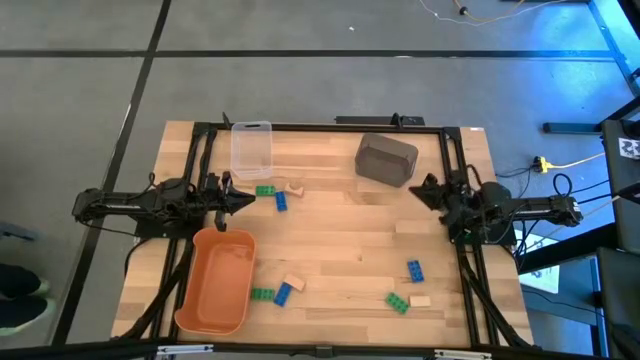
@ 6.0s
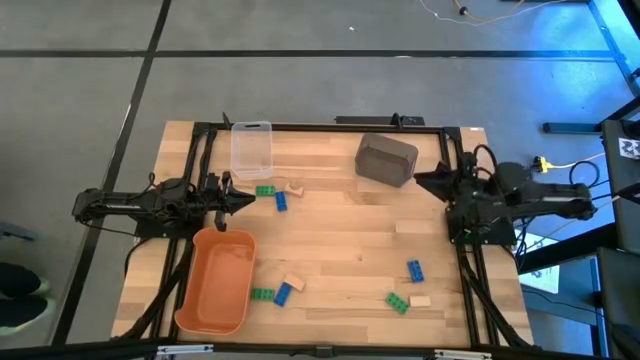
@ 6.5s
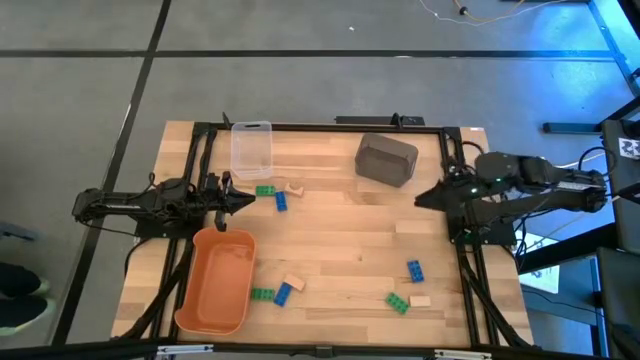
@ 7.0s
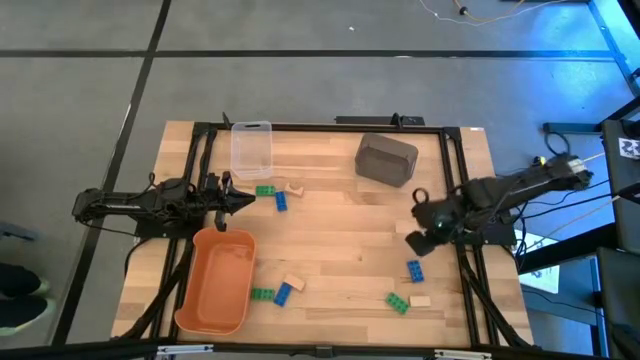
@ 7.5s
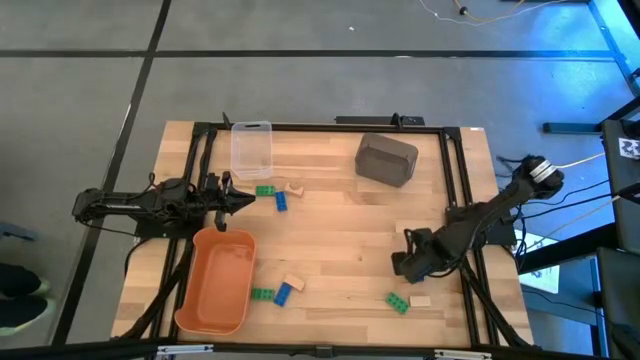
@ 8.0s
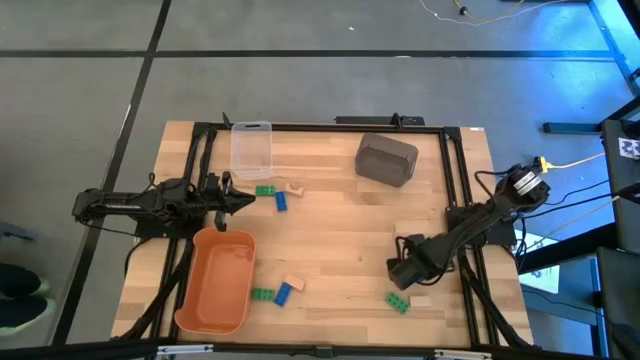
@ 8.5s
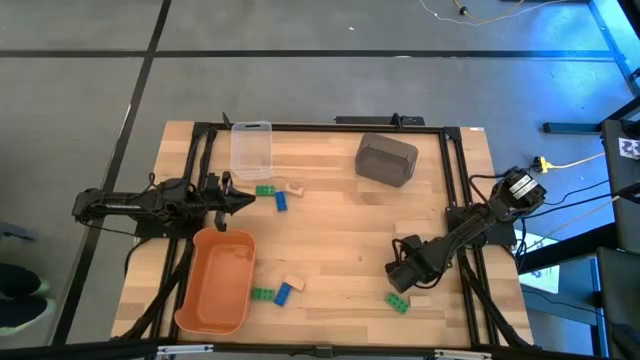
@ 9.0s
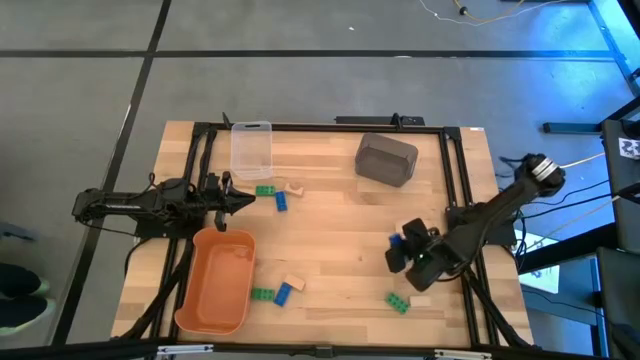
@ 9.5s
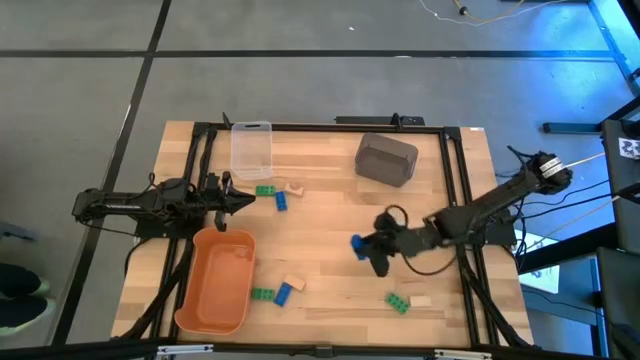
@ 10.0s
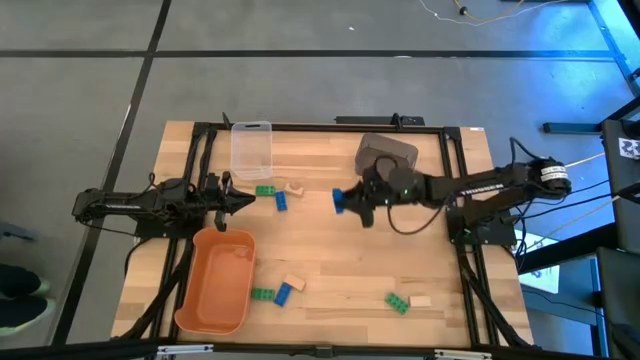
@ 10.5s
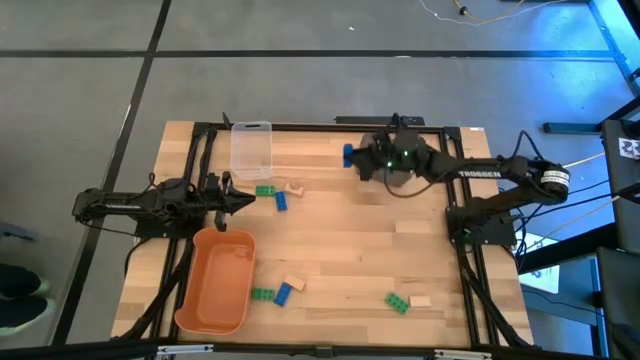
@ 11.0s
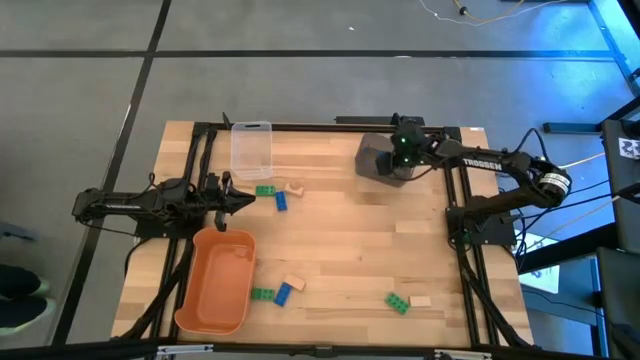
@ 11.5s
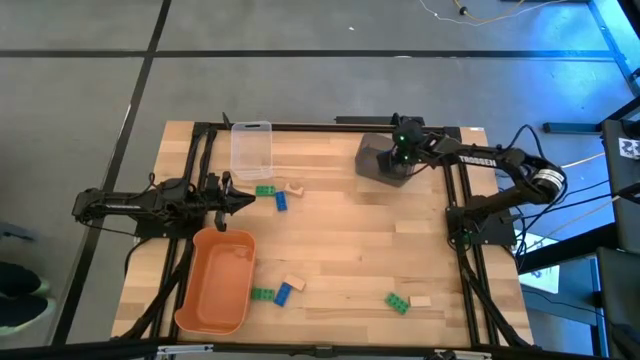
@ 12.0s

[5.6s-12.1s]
Task: Sort & place blocks by color
Put the right blue game piece into the black bin

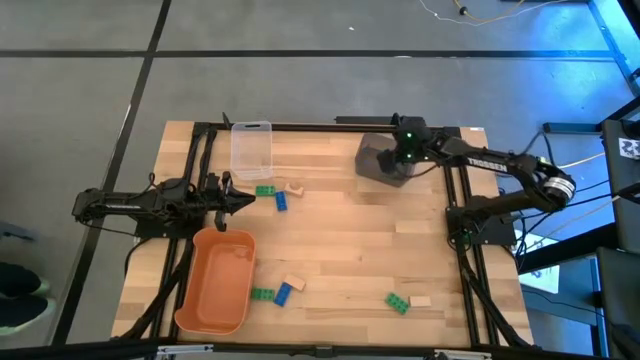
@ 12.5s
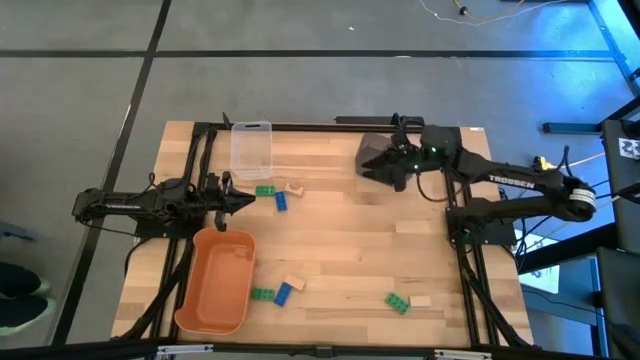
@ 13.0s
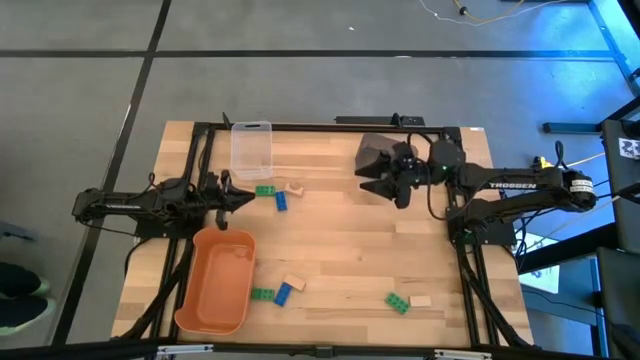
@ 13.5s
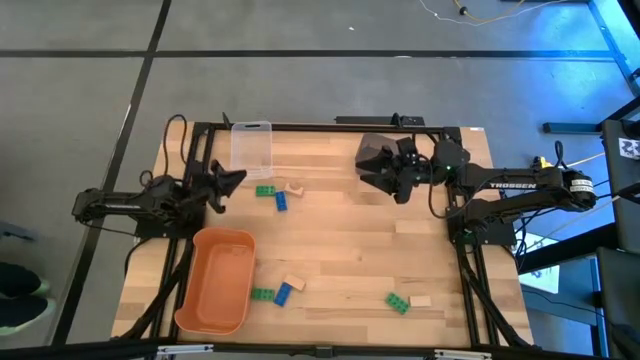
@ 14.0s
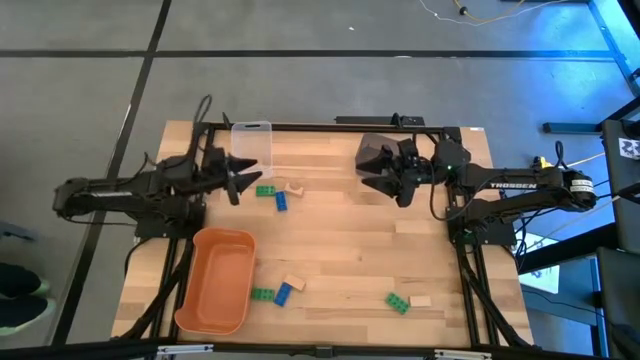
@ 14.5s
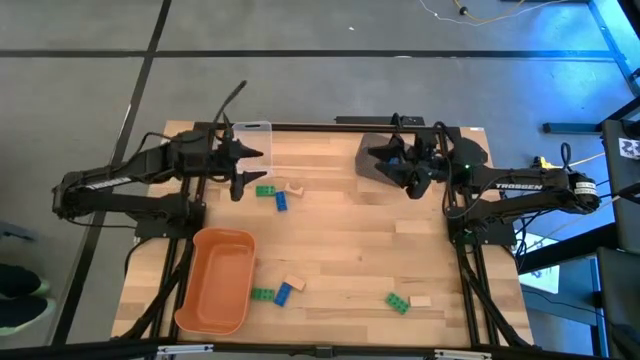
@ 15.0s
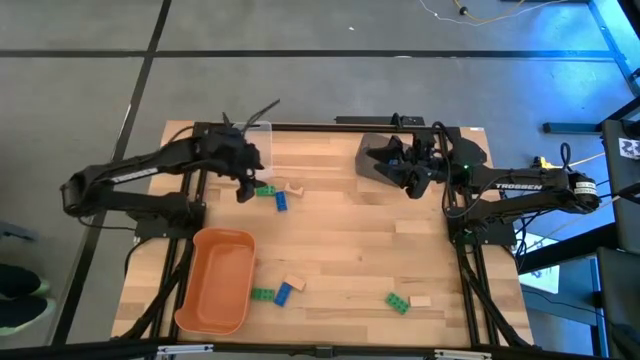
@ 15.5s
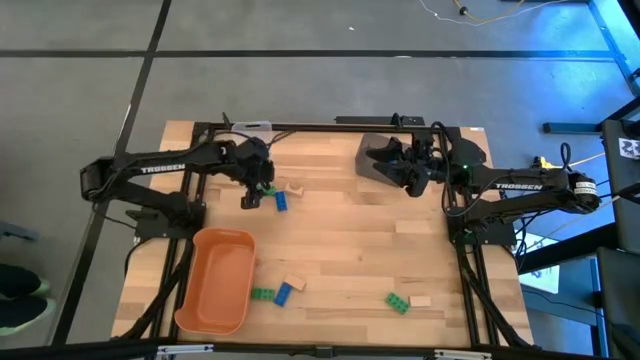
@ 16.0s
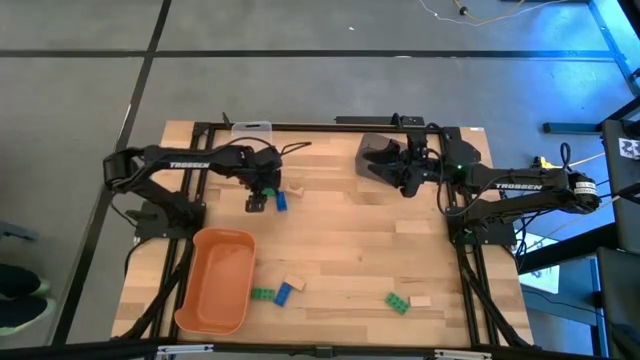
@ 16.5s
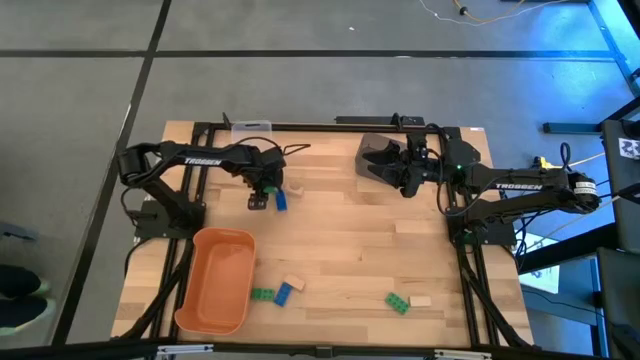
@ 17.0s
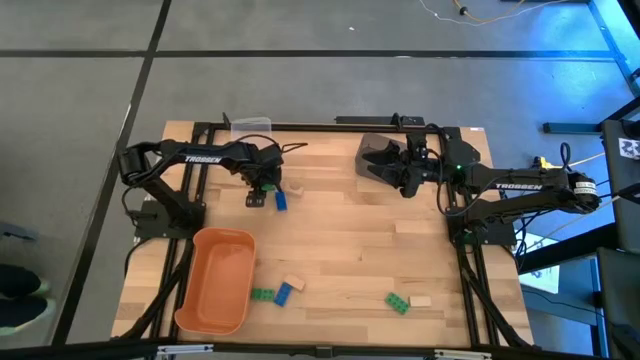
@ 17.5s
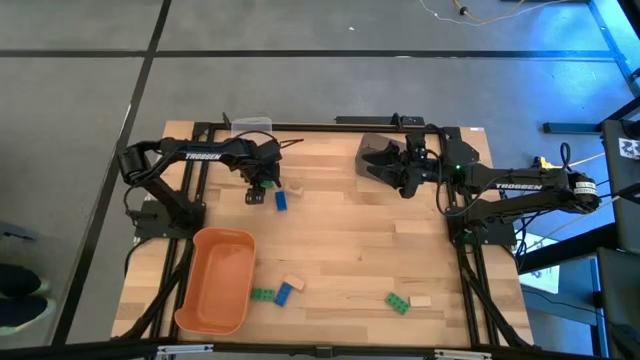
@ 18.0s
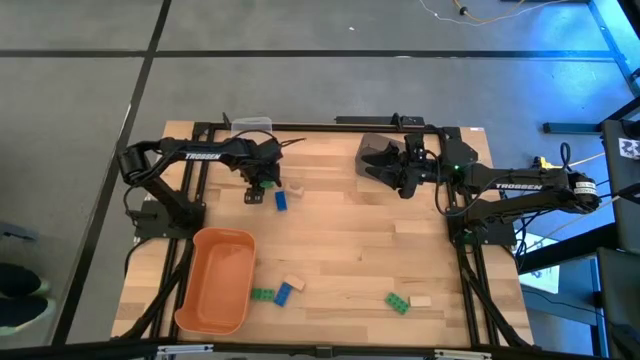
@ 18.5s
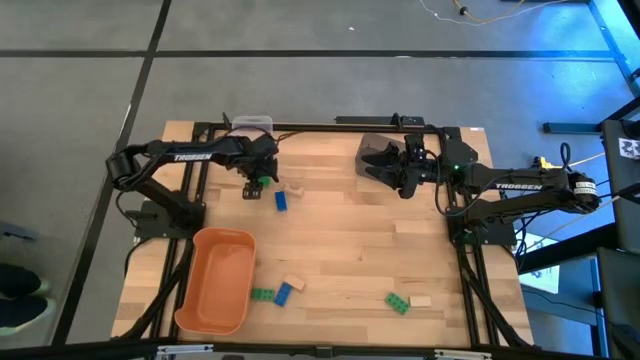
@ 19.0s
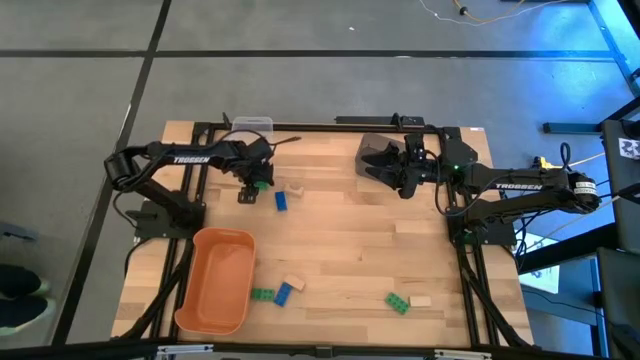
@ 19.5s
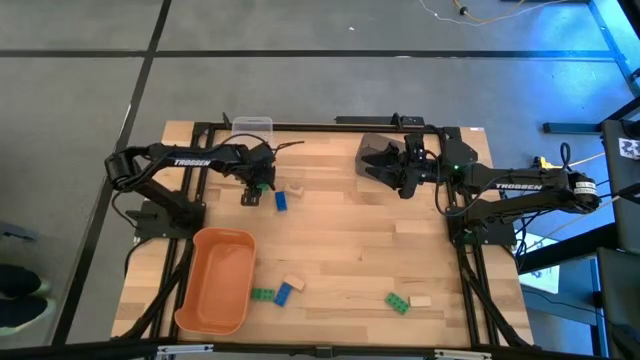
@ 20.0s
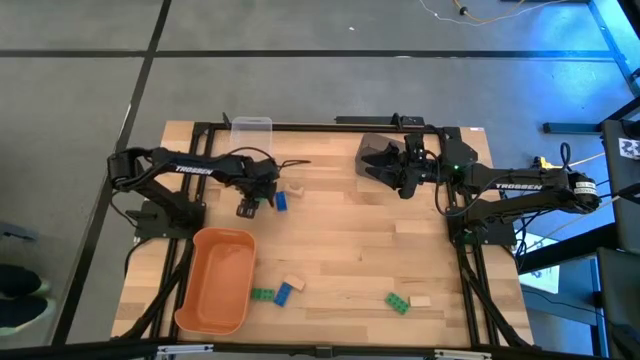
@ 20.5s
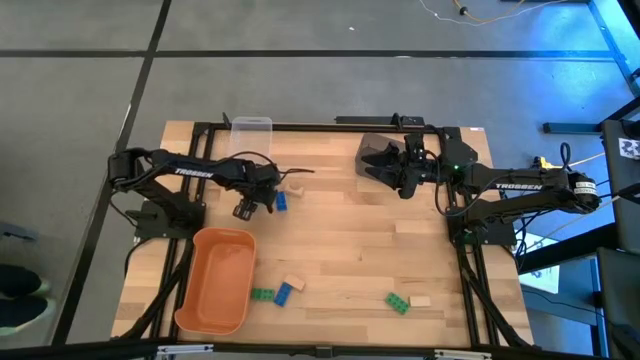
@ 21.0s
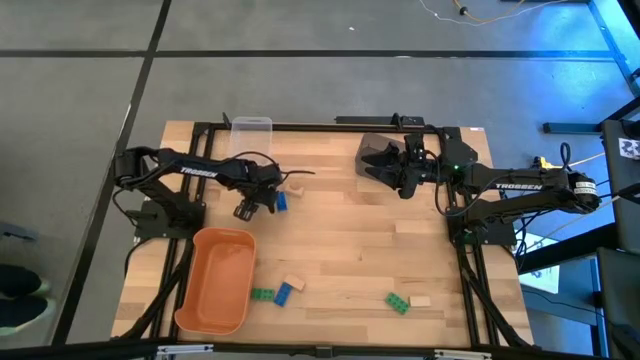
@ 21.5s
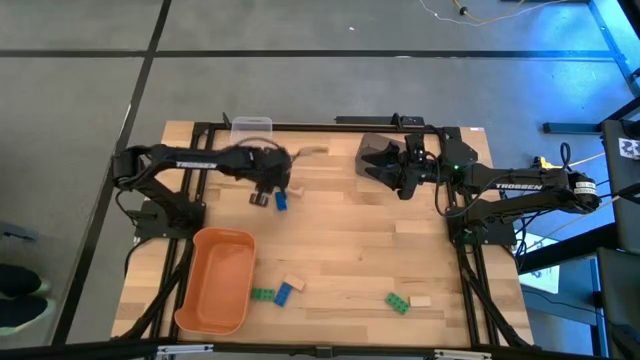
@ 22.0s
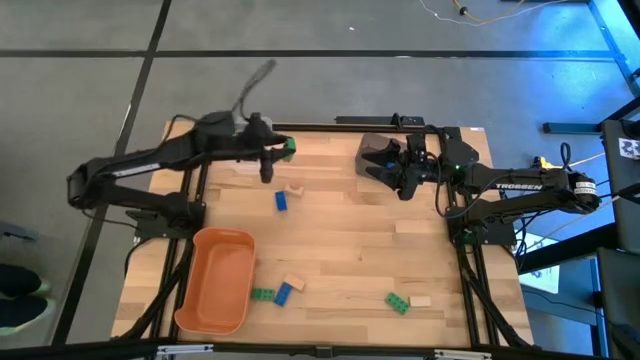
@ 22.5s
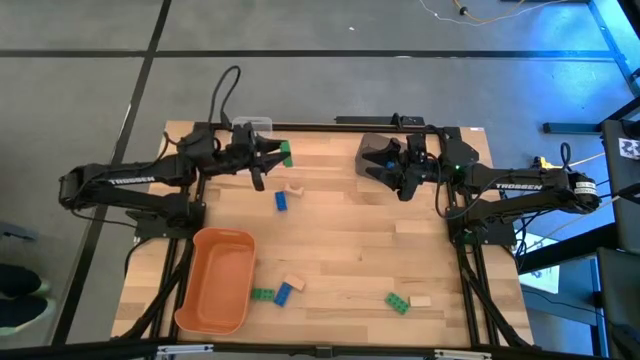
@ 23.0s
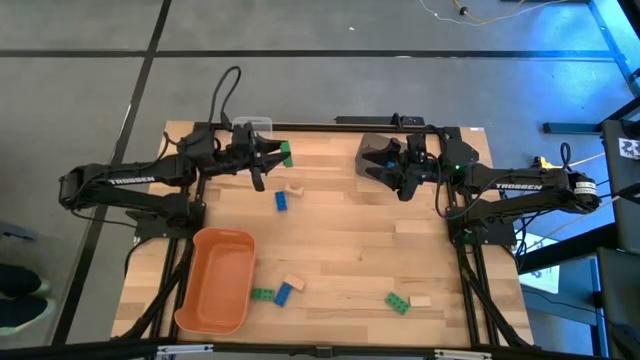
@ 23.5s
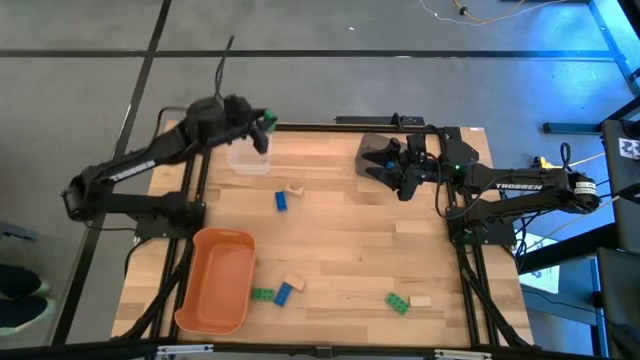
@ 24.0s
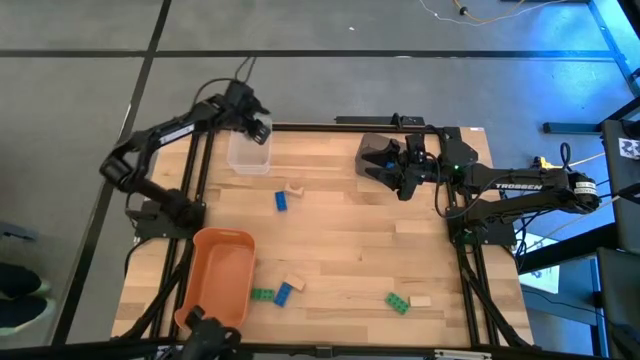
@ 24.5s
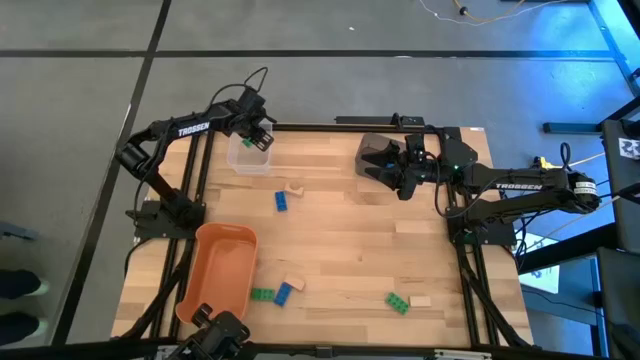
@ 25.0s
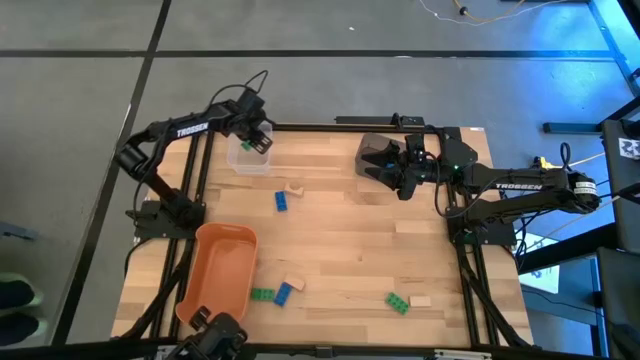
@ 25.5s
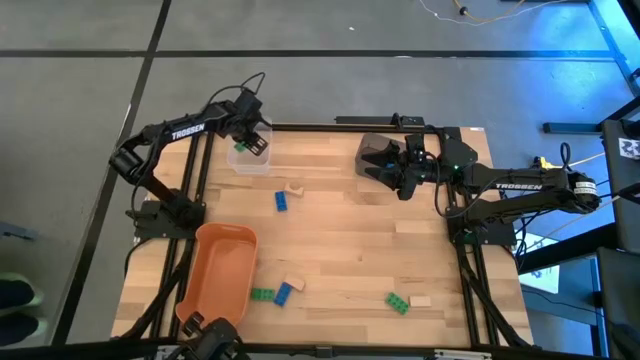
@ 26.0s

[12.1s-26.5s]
Put the top green game piece into the transparent bin

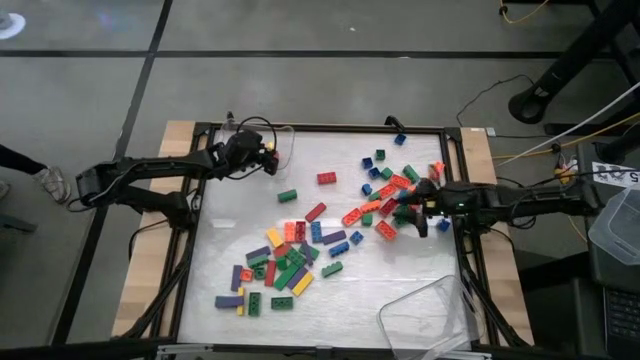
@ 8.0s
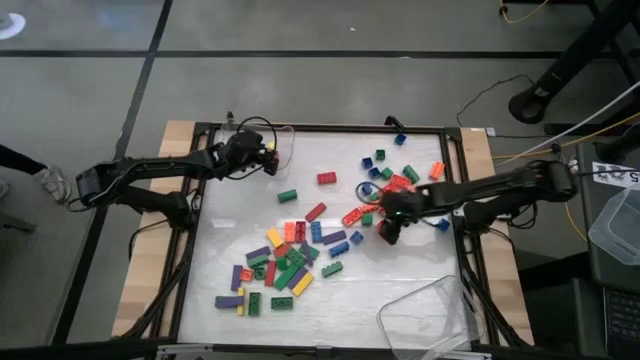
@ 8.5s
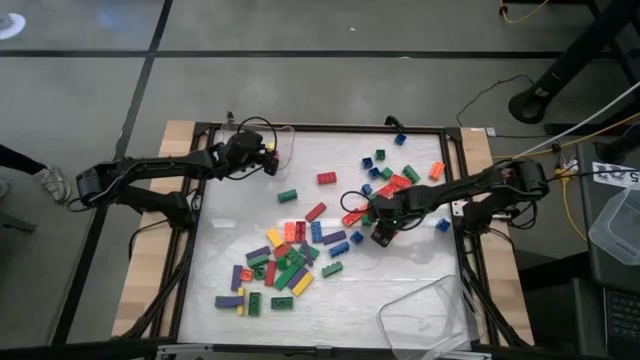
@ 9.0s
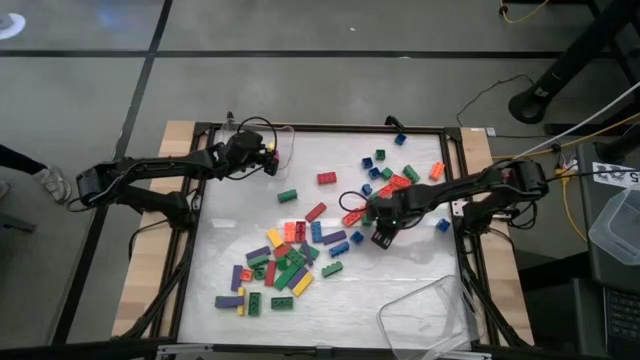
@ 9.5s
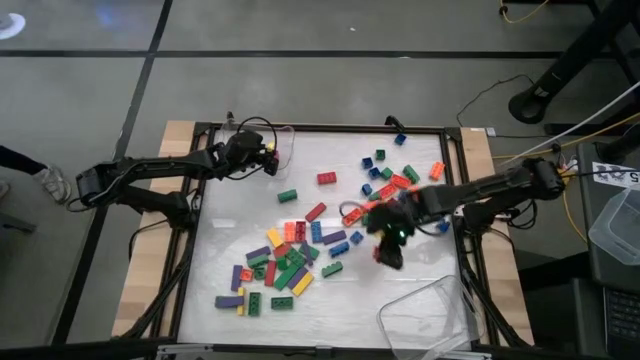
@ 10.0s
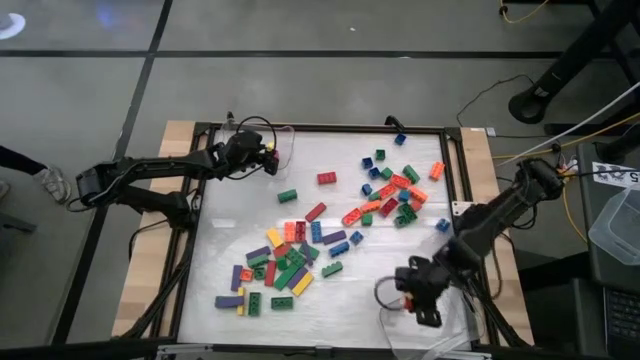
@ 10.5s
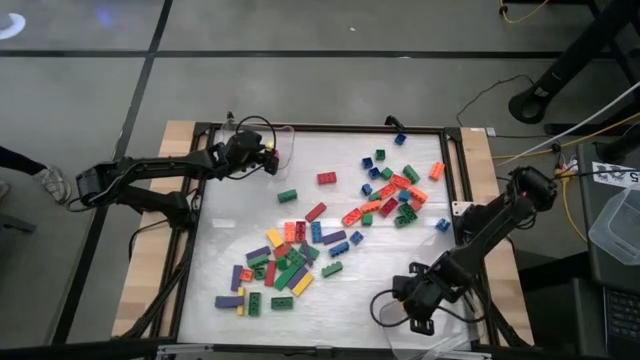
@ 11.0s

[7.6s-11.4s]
Task: Sort blocks by size
Put the rectangular orange game piece into the bottom transparent bin
